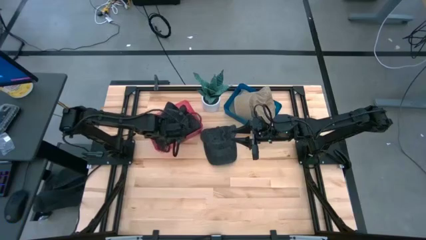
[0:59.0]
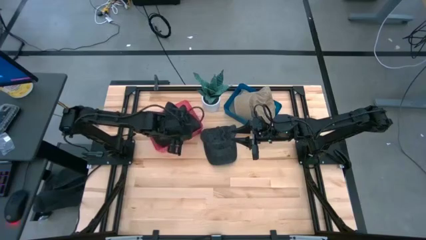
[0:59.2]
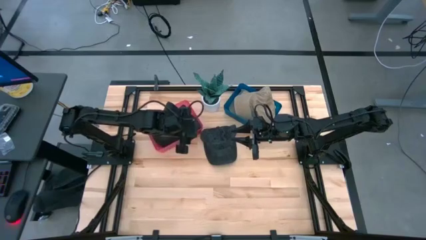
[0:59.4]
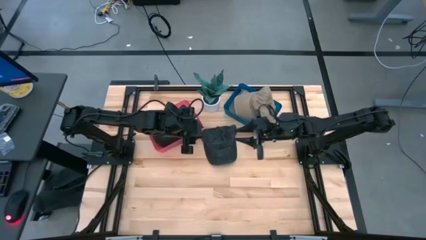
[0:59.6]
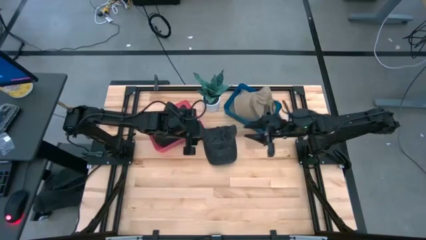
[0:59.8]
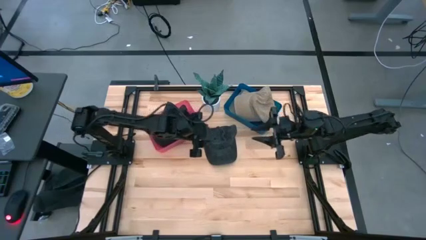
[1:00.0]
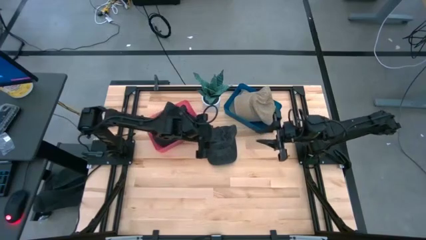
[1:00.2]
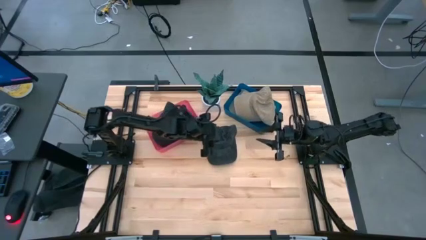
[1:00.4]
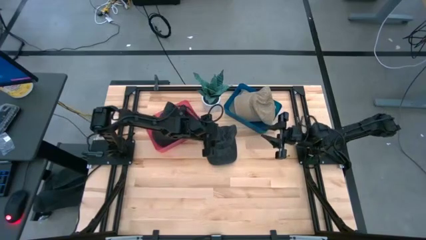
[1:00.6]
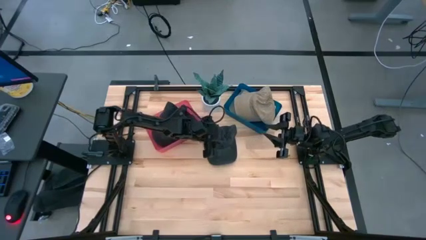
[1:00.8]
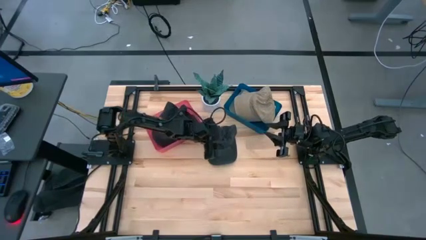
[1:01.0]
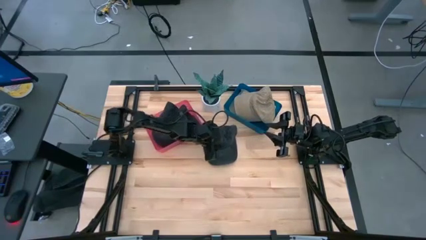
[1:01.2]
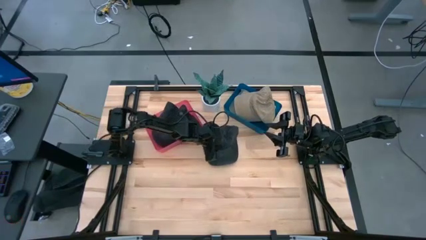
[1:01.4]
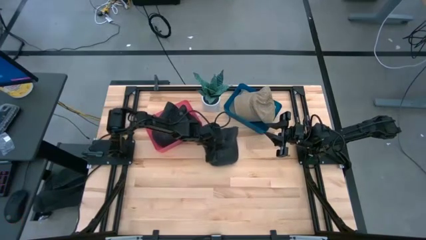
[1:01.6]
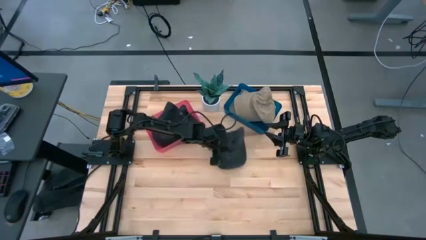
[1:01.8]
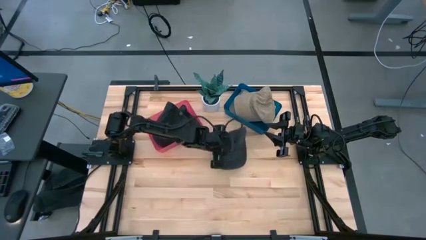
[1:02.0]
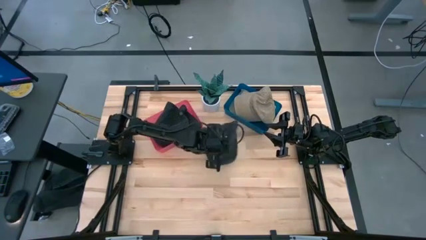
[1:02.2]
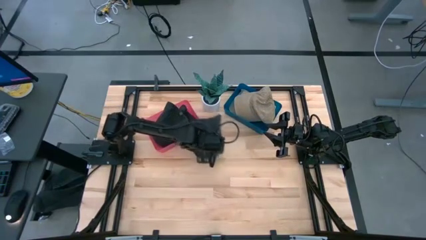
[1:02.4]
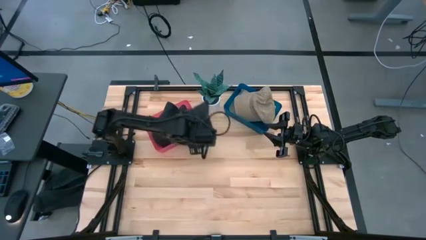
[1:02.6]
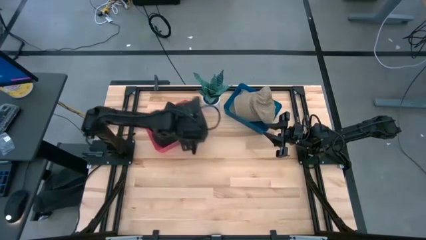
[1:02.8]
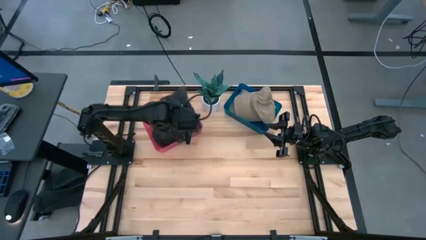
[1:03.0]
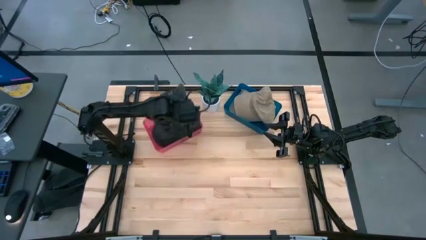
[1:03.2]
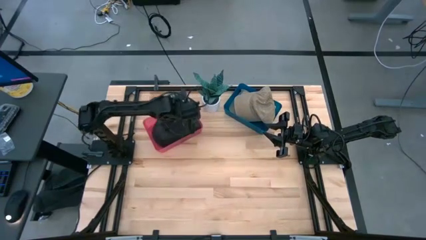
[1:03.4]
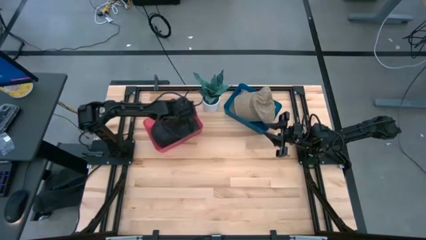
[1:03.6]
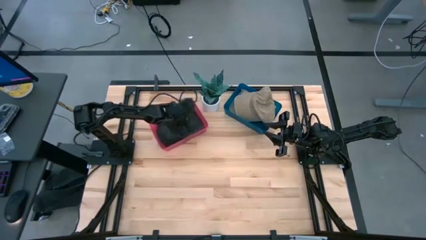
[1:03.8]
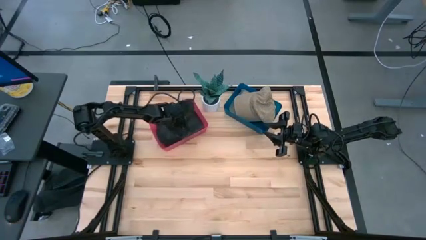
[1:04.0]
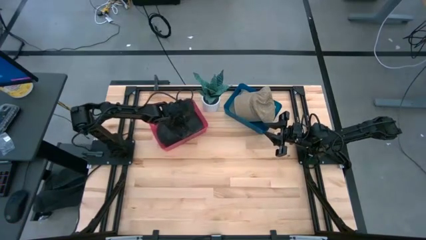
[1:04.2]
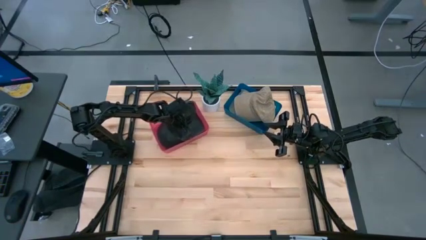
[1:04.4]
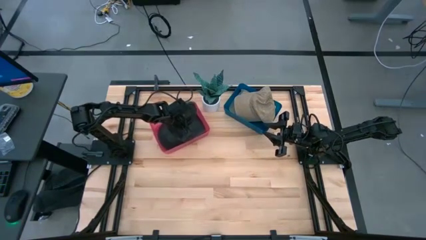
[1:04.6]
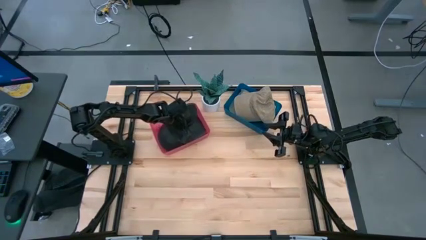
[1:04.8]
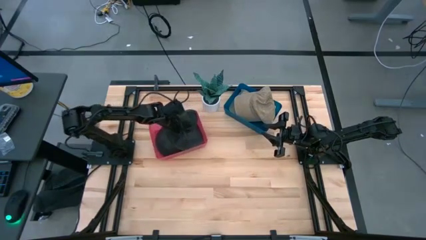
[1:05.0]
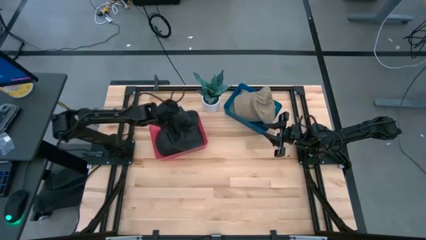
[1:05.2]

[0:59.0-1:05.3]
Task: Pick & Place hat
Put the black cap into the pink bin

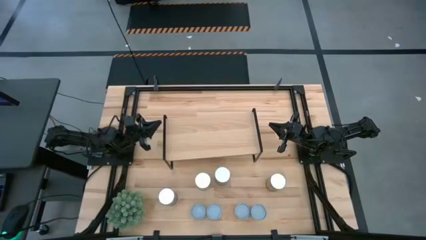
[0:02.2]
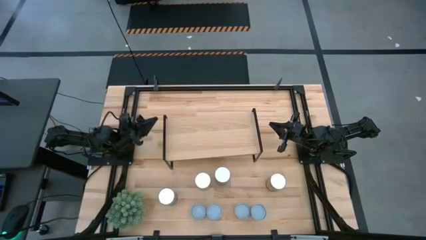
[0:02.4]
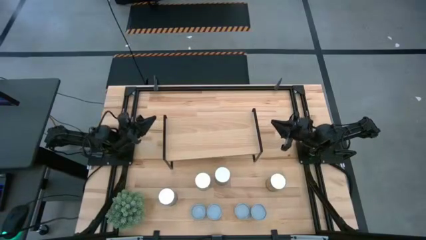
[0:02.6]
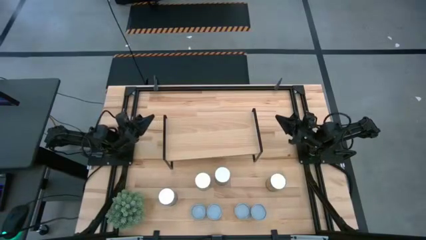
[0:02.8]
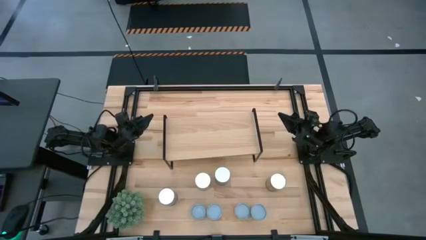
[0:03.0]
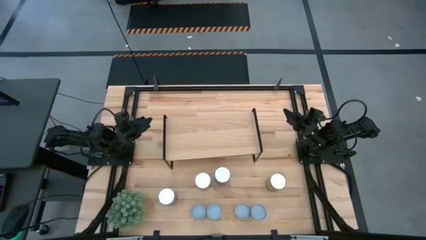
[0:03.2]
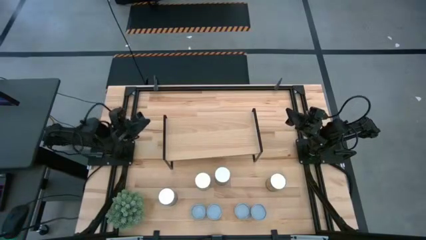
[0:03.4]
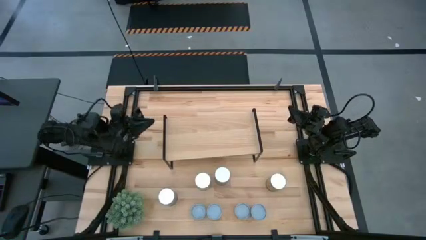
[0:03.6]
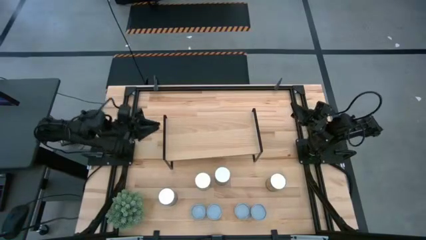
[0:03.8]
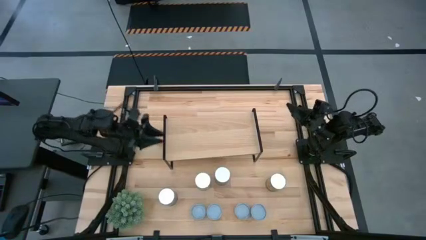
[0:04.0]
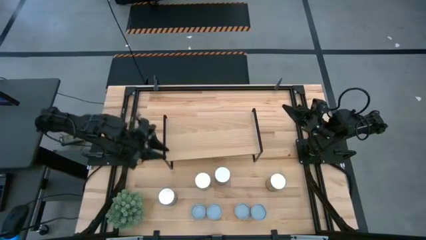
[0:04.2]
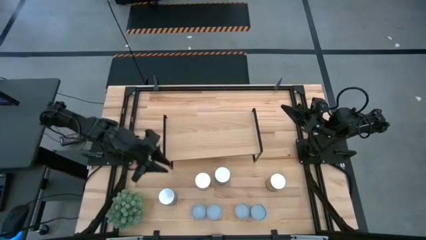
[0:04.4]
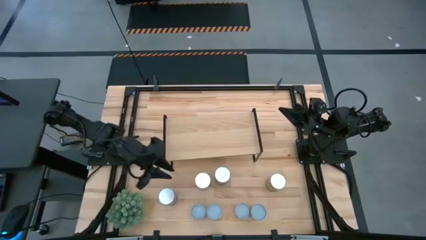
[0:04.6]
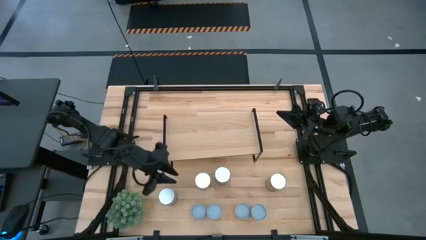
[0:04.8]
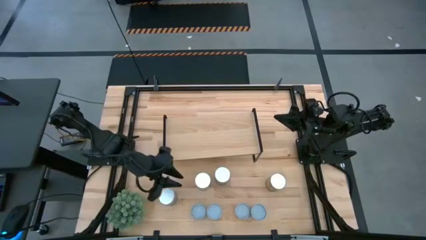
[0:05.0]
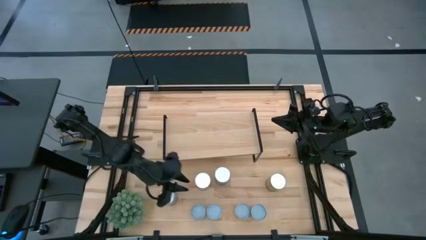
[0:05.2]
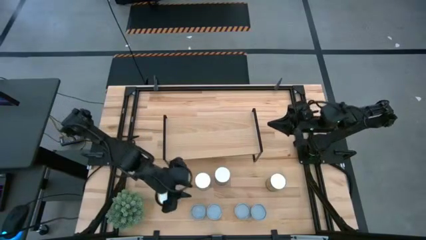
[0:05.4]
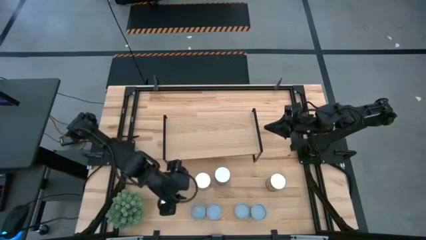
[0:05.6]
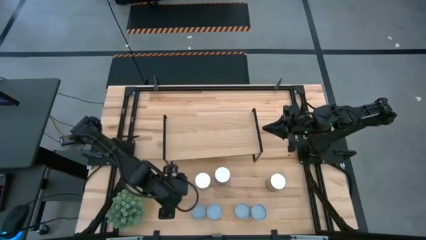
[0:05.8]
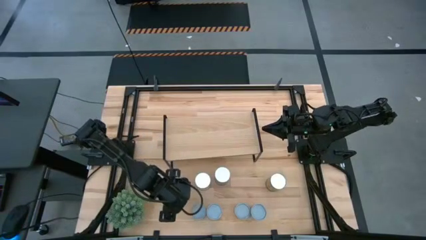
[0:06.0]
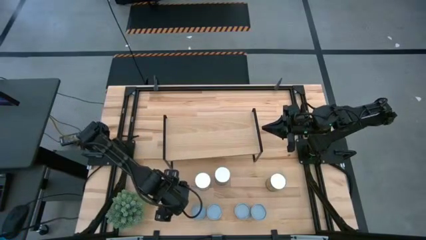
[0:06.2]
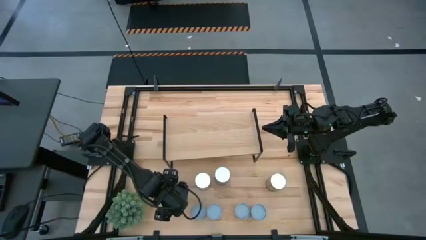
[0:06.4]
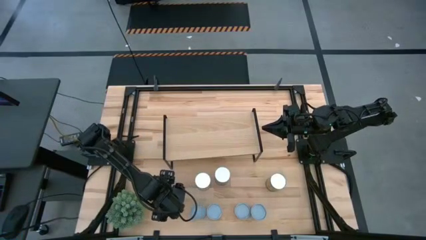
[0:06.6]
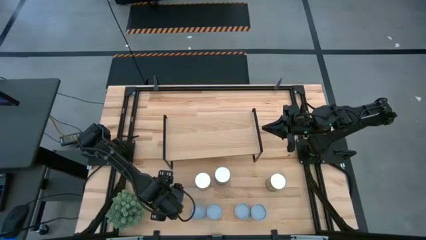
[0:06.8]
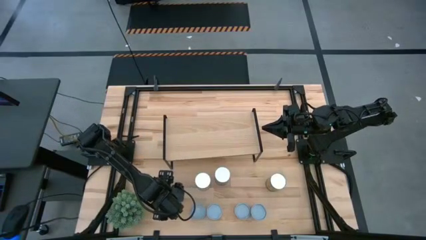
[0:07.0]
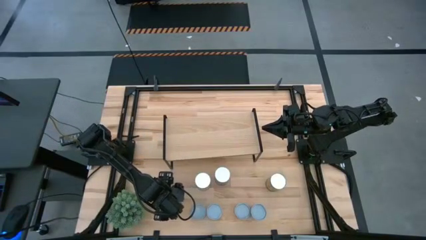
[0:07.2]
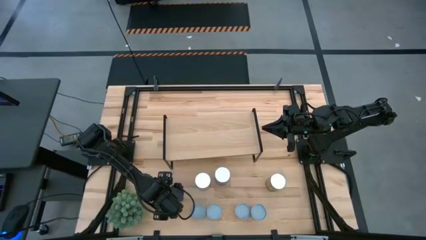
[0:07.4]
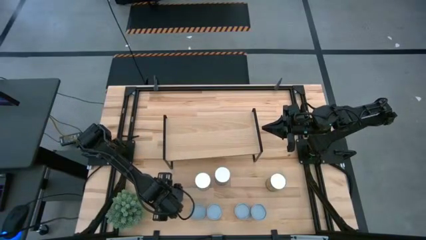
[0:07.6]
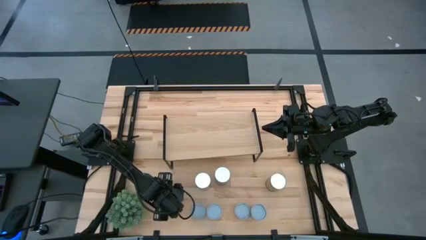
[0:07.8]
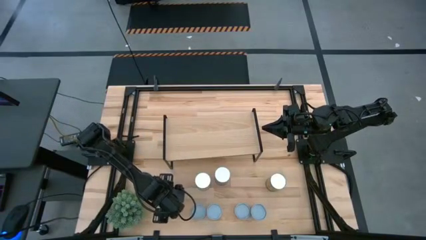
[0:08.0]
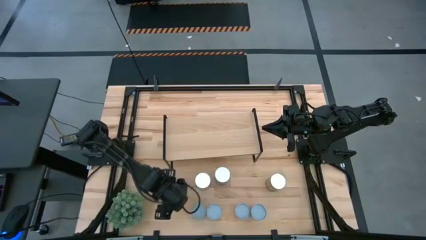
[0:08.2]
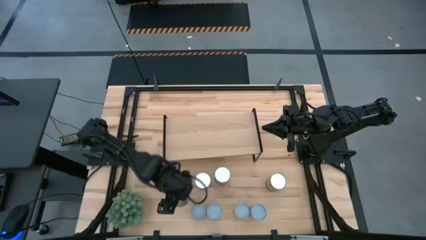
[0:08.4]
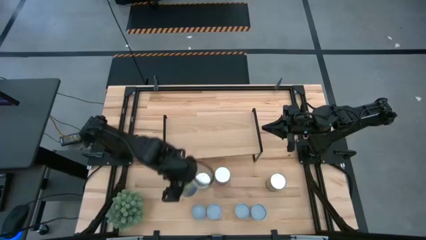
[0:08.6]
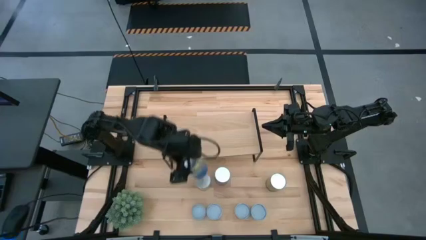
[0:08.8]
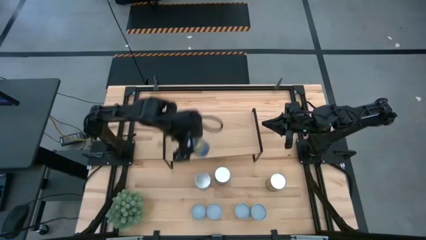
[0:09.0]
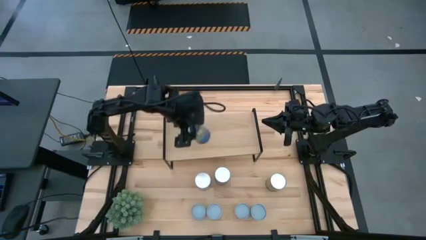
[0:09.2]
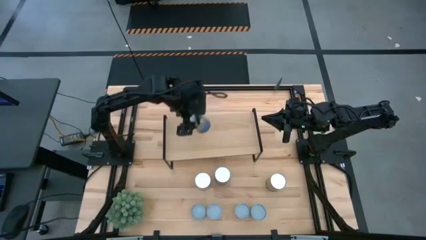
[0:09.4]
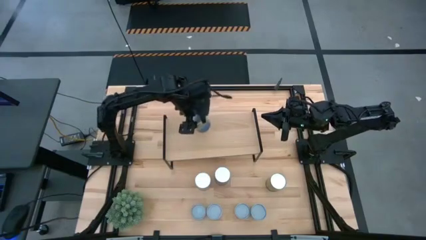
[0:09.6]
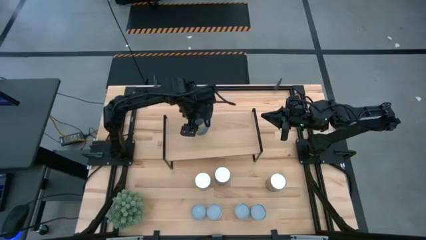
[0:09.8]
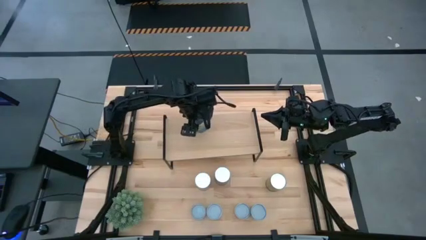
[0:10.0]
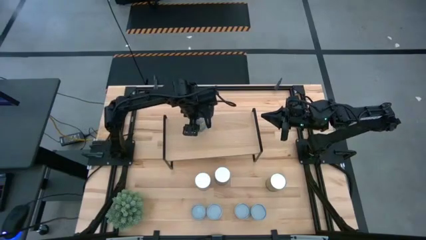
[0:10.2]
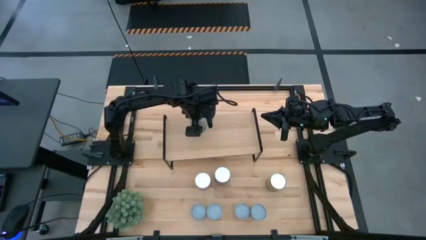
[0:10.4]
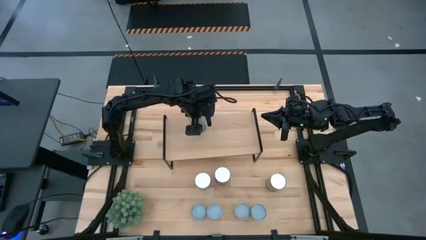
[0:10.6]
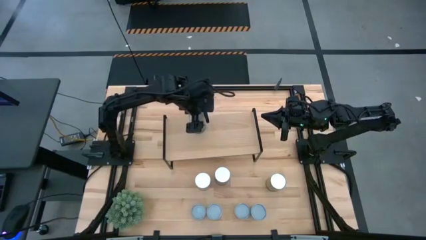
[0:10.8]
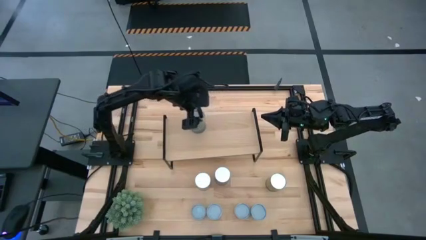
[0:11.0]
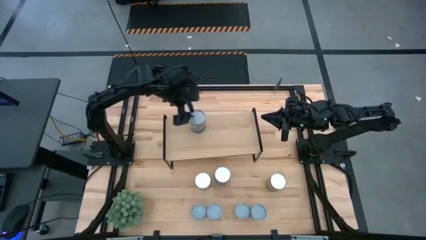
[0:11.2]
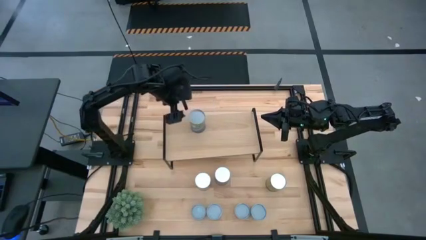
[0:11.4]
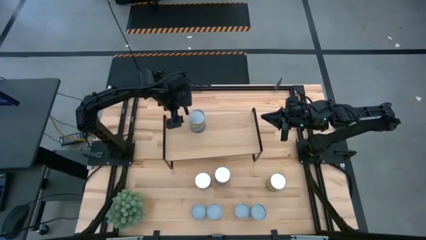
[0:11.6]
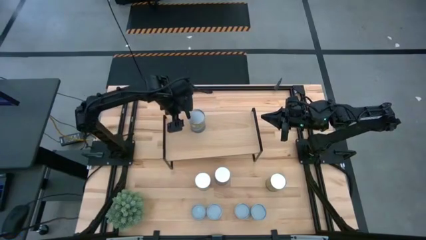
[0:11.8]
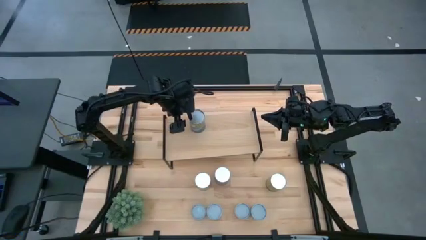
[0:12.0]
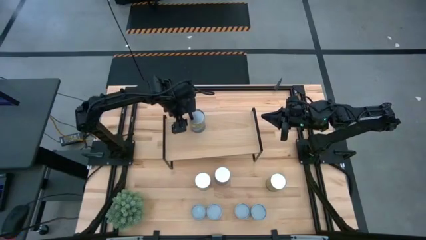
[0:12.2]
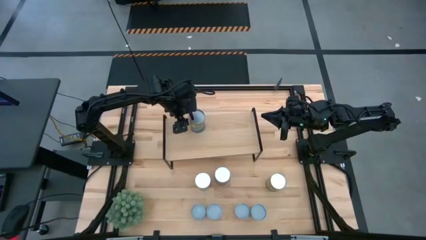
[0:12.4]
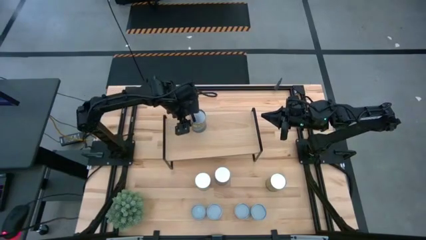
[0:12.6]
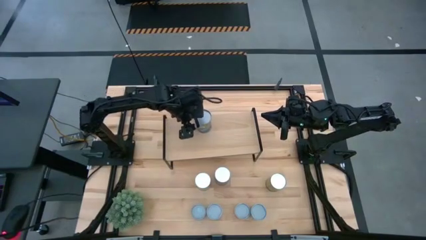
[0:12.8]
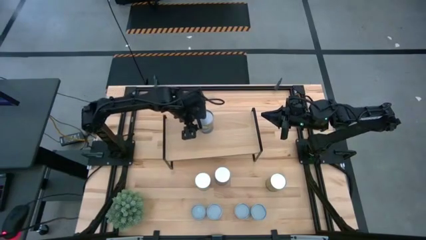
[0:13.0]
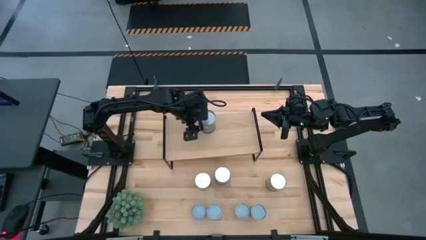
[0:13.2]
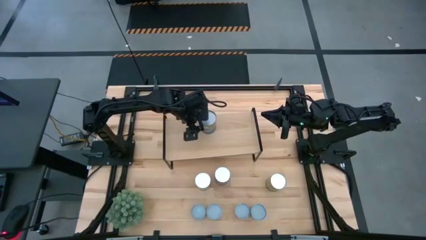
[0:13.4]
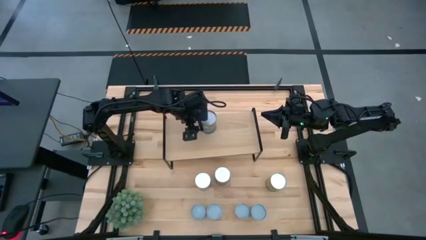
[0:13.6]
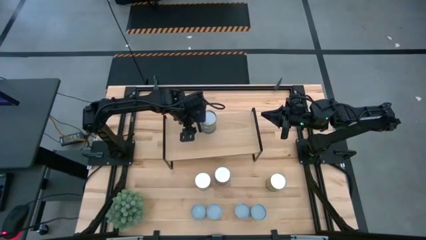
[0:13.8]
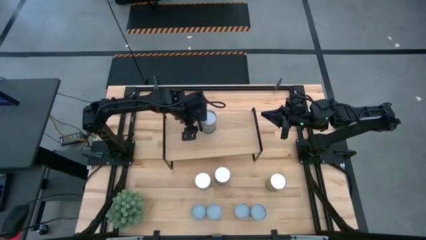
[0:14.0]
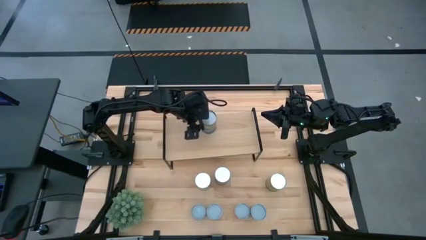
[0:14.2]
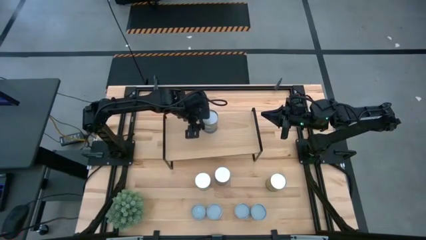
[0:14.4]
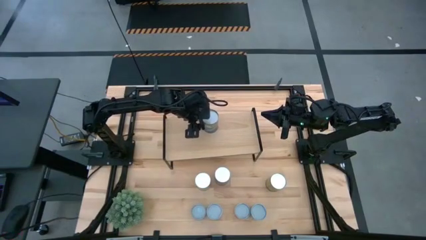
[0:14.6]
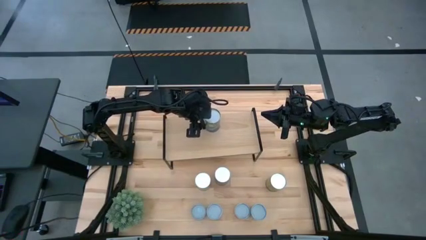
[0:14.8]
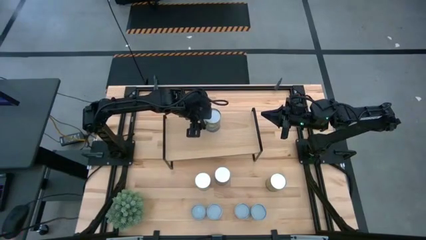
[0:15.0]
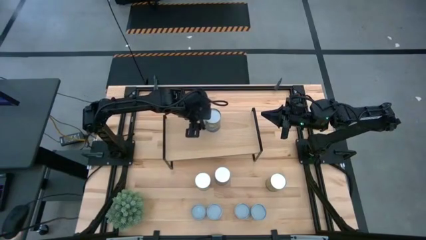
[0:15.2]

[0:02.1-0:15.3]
Task: Pick and place cans onto a shelf
Put the canned peas on the shelf
